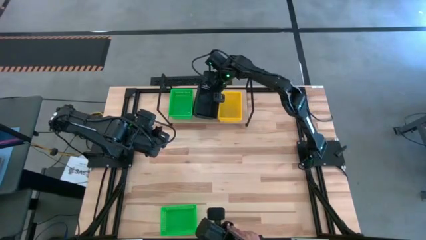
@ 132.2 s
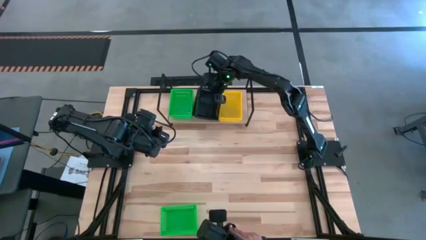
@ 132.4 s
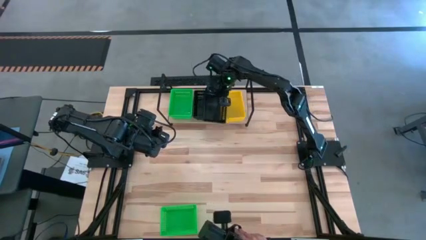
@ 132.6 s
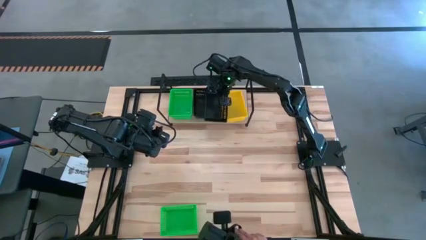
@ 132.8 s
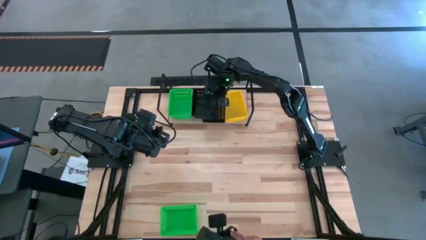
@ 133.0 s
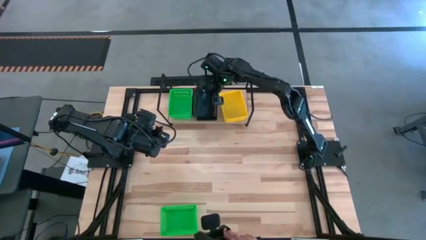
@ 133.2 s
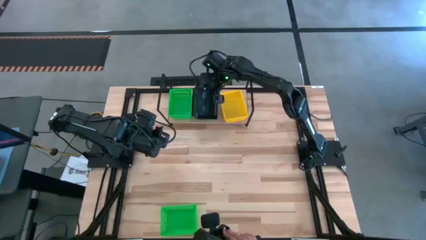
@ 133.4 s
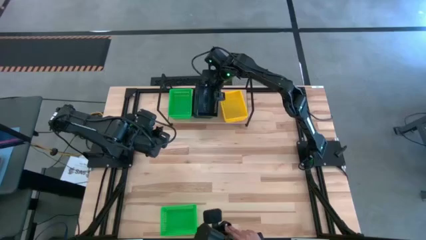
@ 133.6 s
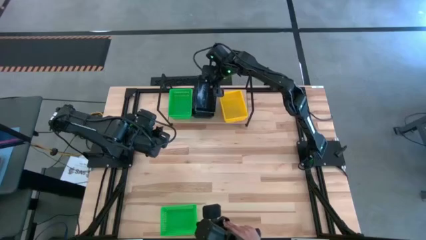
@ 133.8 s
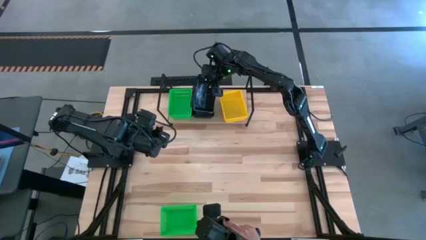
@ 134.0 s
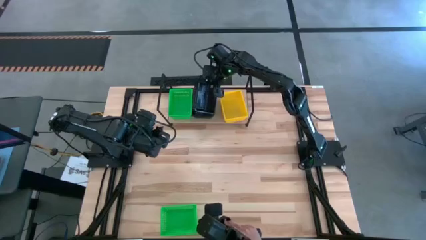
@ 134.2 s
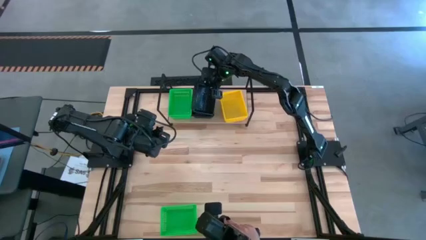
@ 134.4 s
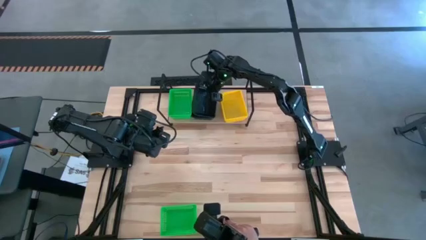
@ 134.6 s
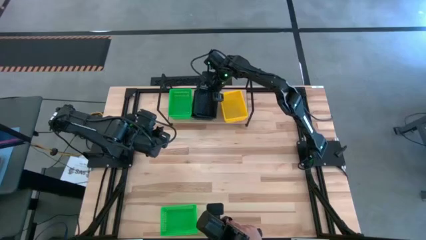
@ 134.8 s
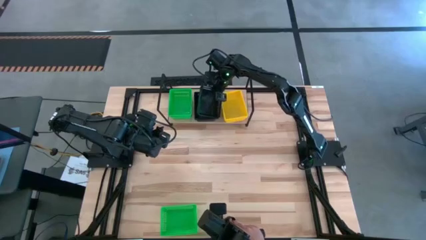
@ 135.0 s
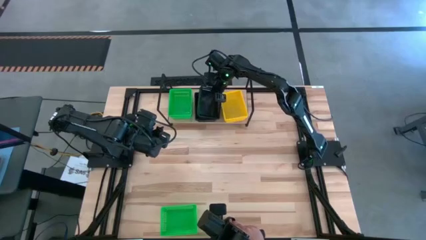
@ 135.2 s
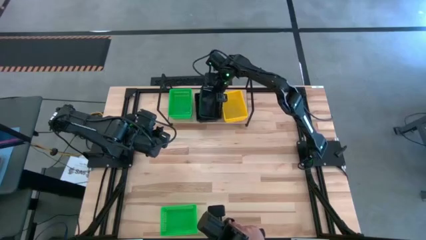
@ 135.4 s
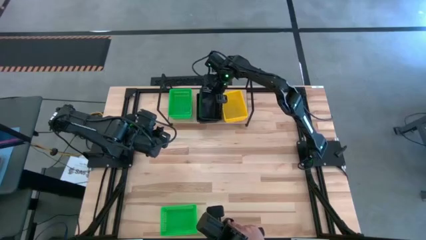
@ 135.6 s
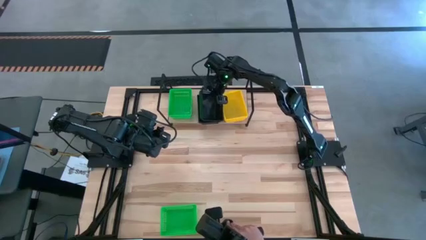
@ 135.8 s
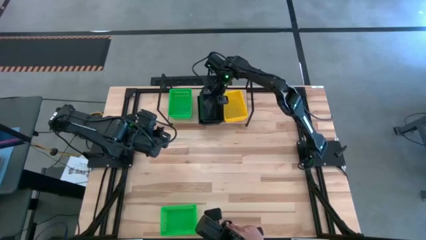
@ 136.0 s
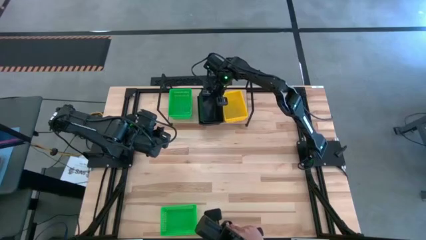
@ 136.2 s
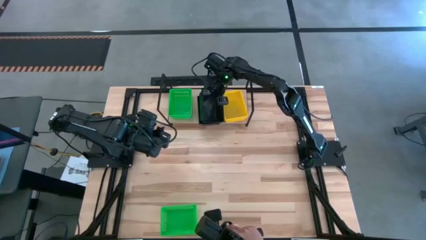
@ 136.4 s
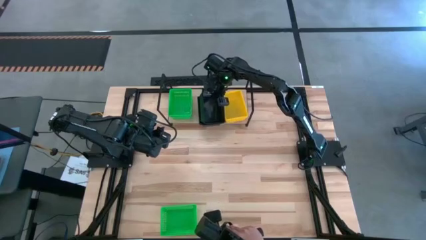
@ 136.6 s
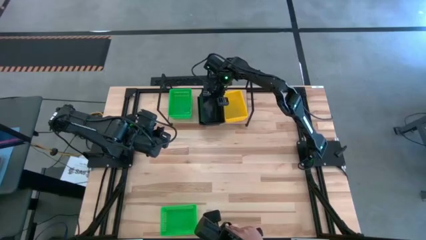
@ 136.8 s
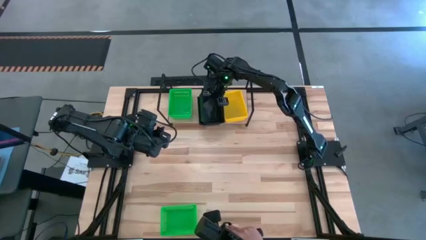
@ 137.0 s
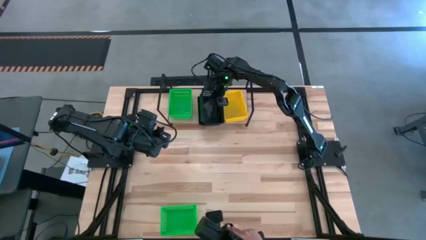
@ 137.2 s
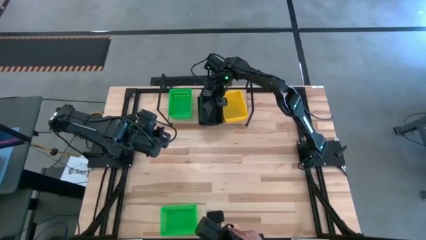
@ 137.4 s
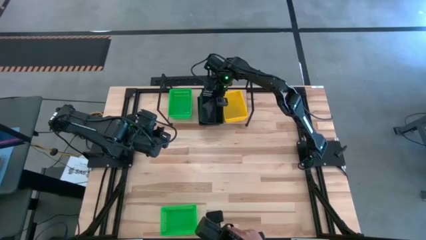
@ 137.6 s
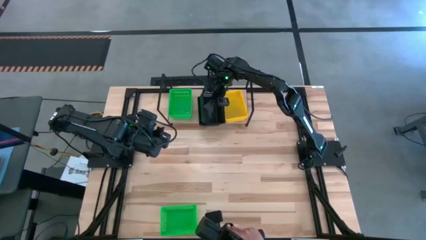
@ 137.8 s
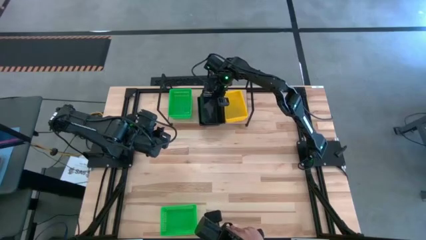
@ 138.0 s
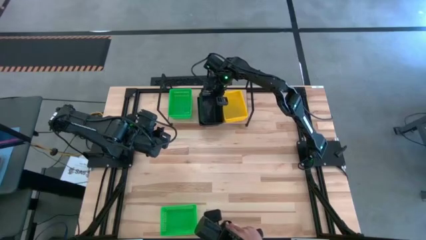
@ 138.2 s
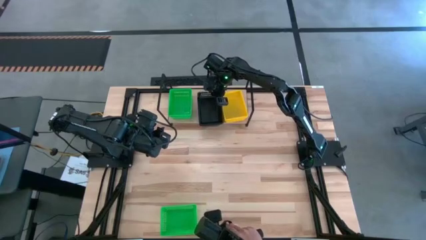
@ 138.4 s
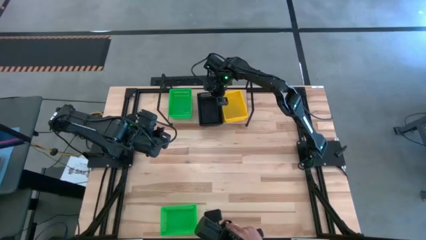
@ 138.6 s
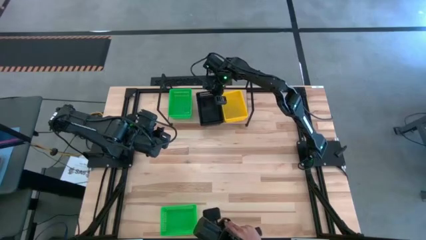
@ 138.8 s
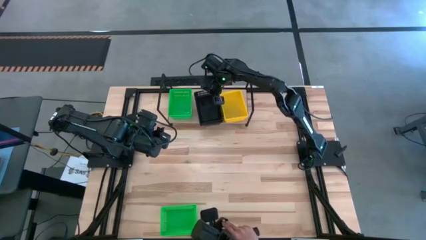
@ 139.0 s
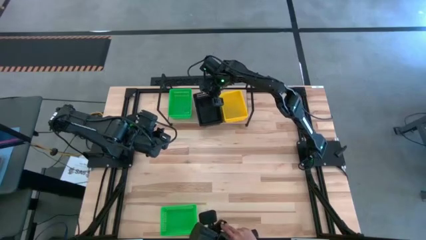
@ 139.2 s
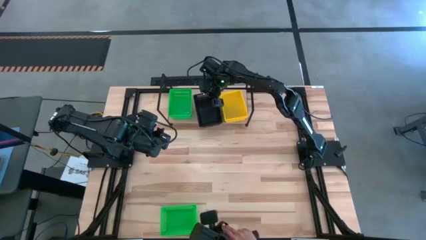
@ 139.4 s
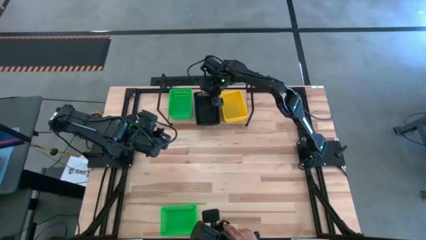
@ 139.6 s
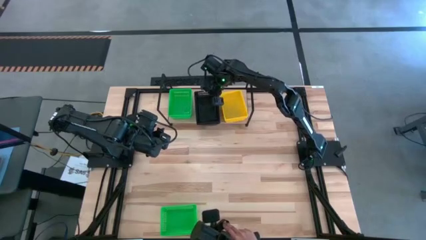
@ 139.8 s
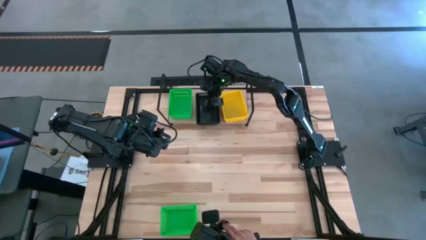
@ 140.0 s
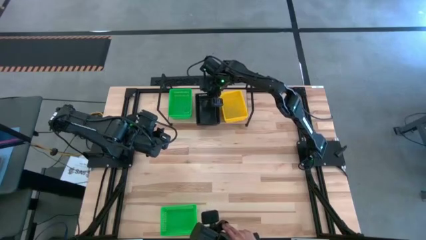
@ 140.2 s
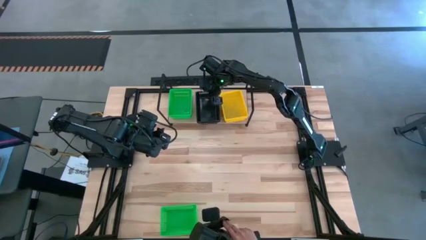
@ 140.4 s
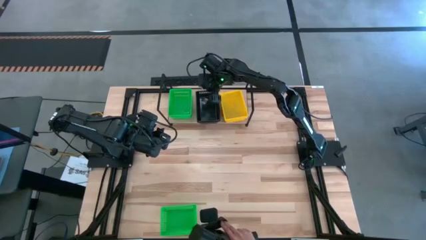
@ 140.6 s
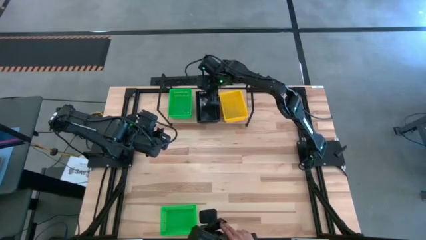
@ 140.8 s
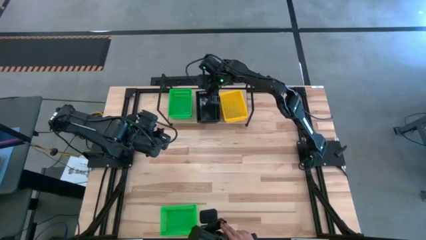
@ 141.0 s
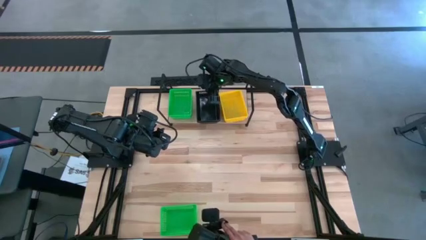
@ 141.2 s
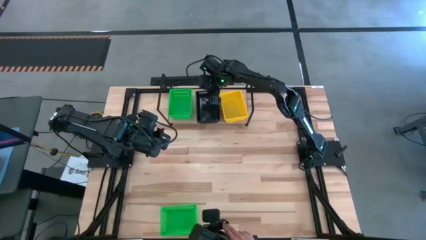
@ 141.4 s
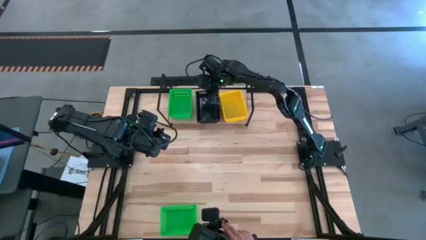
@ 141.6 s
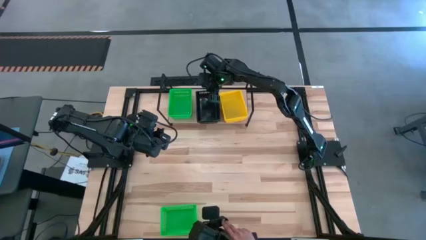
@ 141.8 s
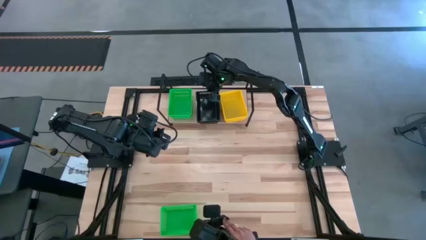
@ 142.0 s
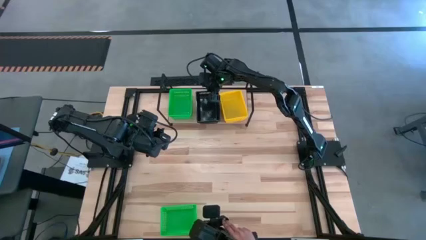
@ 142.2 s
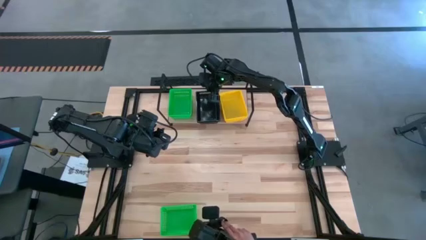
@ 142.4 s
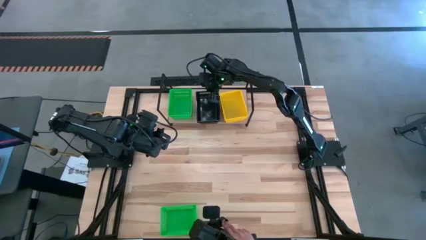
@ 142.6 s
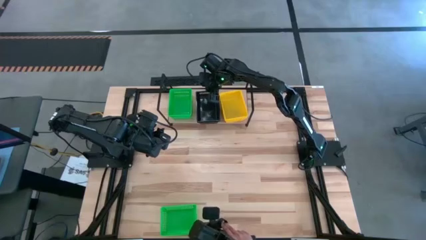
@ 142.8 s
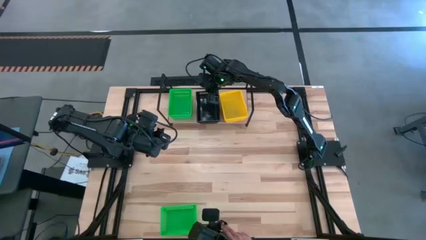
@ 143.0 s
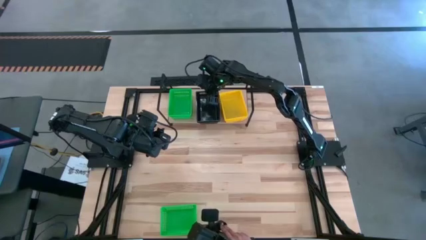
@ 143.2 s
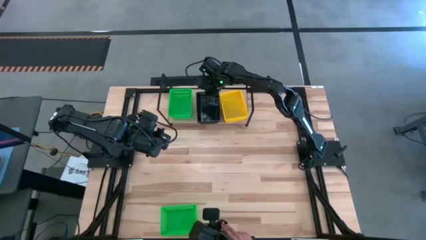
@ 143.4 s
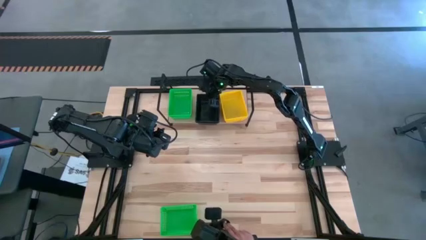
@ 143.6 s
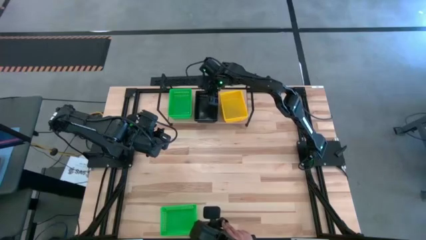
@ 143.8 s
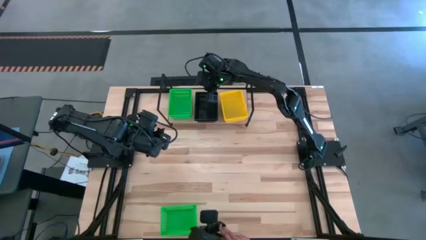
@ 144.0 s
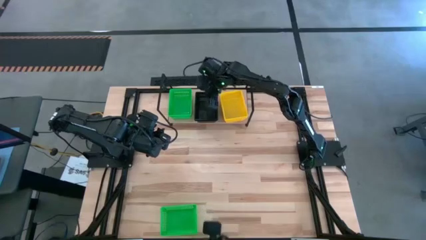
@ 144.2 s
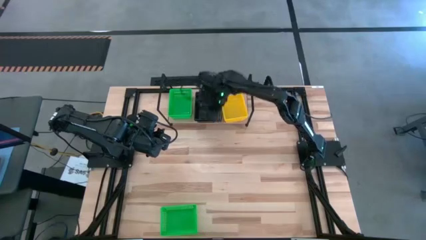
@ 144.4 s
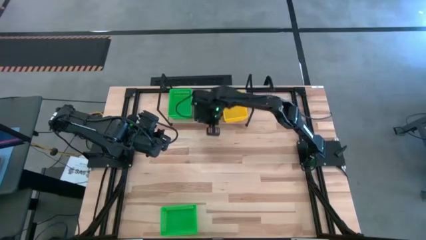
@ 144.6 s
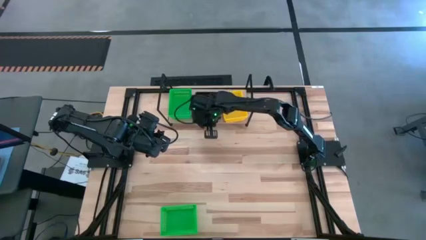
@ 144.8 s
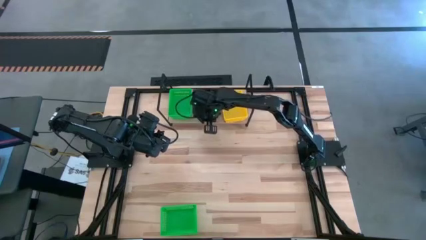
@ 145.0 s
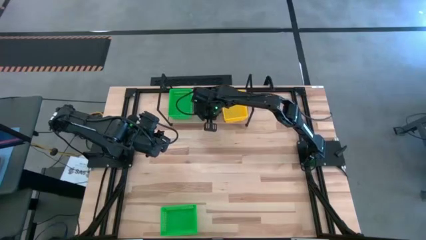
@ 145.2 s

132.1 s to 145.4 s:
Task: Stack baskets on shelf by color
Stack the black basket on top of the black basket on the shelf

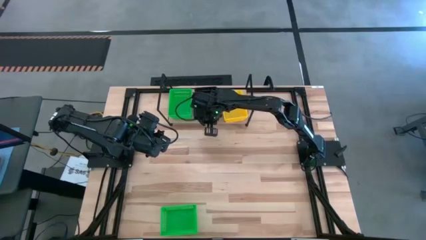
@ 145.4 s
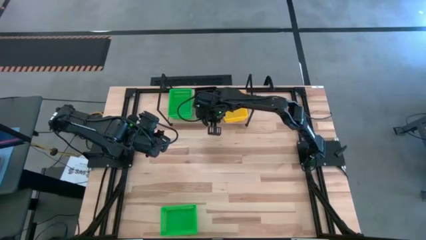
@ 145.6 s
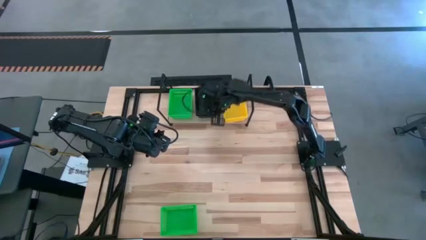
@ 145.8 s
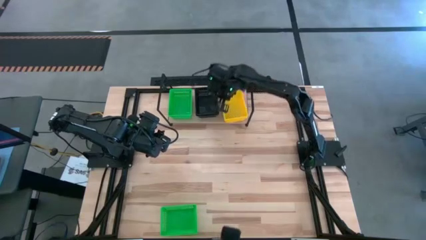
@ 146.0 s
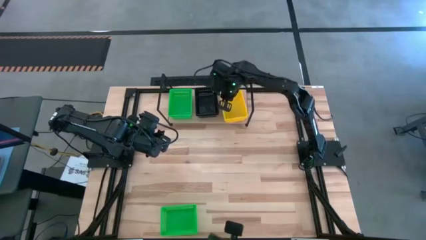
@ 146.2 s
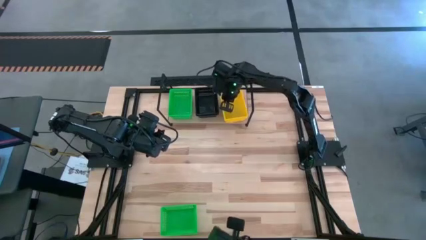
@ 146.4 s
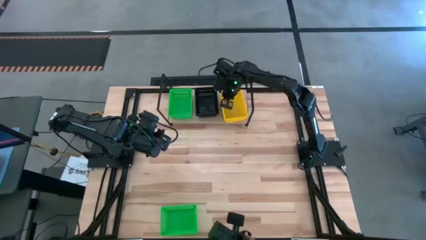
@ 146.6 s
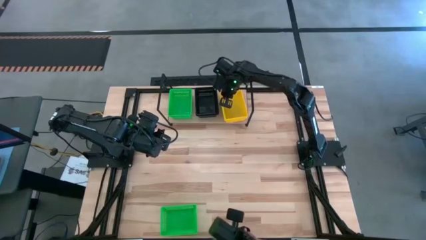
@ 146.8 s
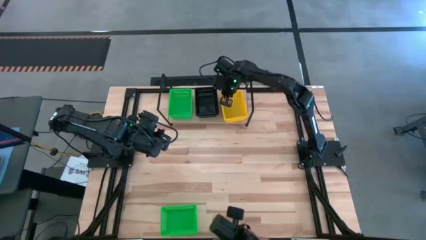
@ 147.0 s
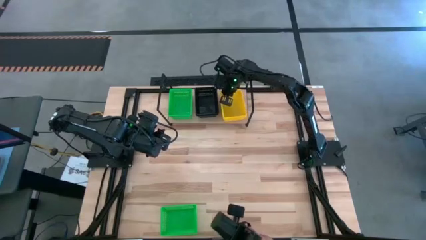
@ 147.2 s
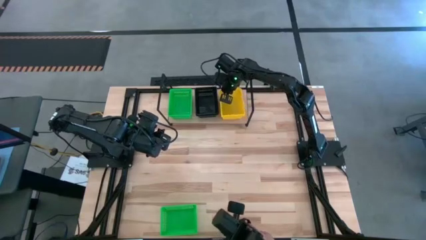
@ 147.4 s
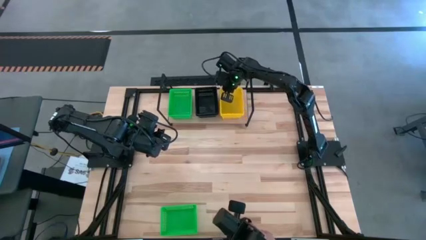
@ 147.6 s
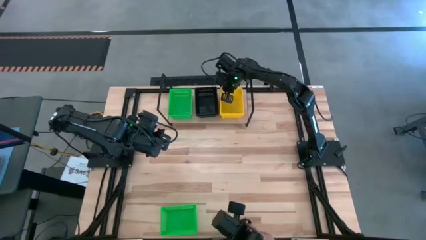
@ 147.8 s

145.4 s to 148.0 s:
Adjust the stacked yellow baskets on the shelf
